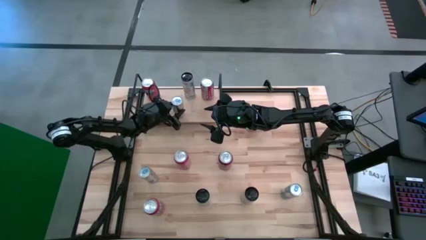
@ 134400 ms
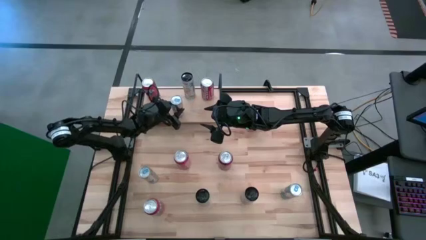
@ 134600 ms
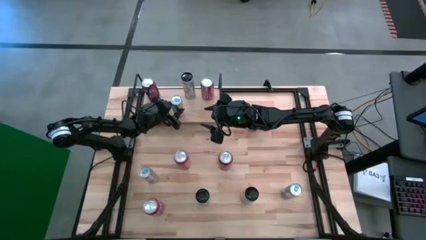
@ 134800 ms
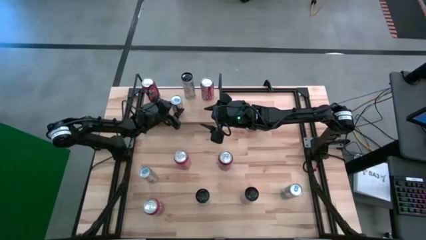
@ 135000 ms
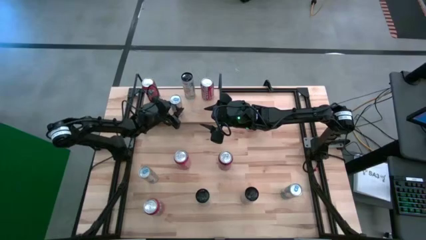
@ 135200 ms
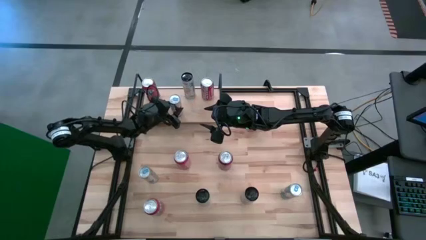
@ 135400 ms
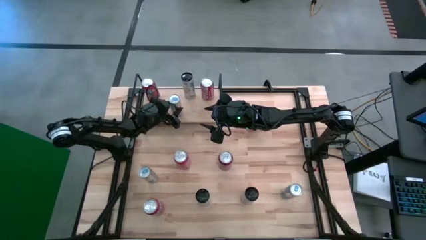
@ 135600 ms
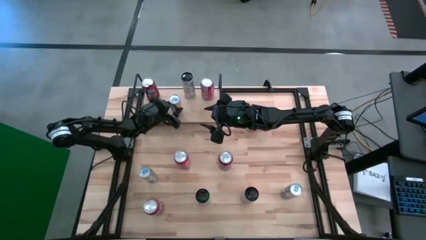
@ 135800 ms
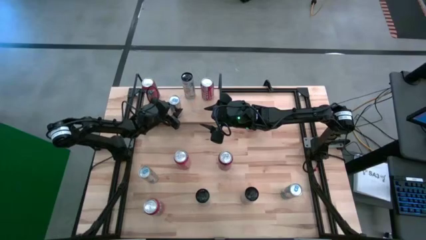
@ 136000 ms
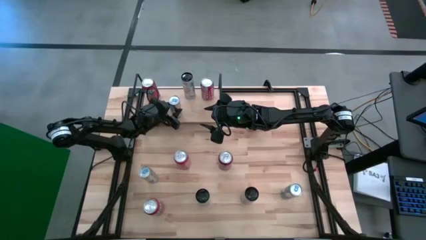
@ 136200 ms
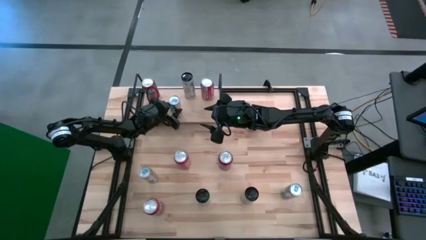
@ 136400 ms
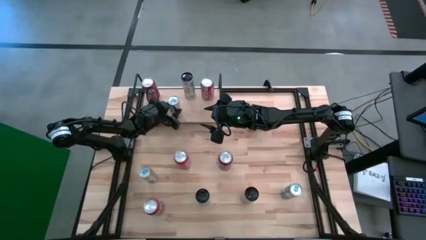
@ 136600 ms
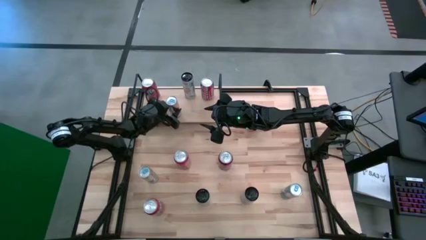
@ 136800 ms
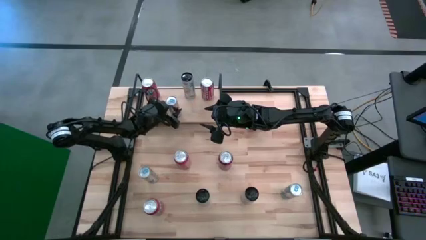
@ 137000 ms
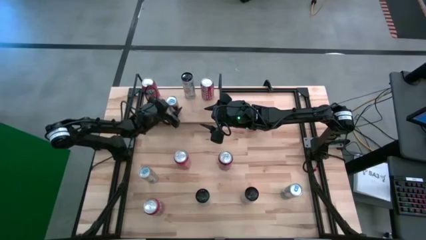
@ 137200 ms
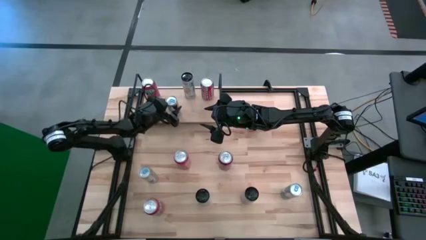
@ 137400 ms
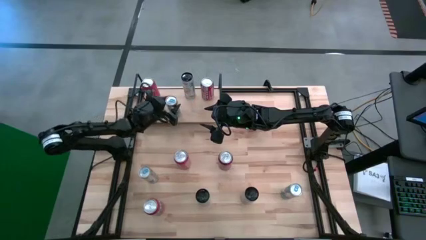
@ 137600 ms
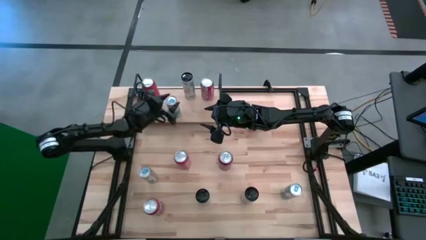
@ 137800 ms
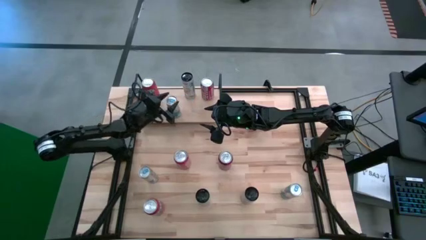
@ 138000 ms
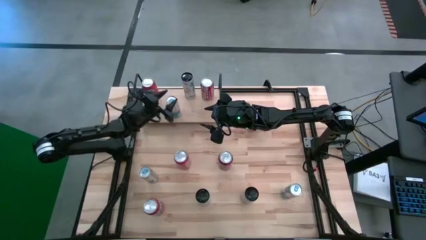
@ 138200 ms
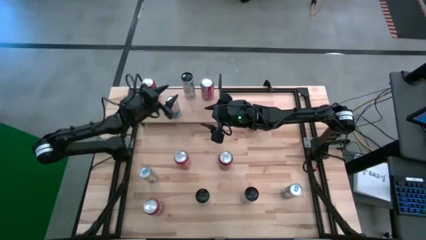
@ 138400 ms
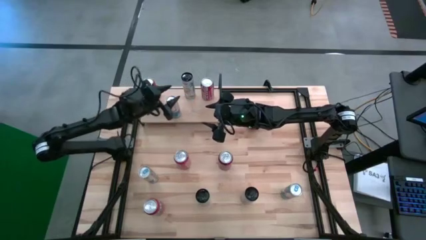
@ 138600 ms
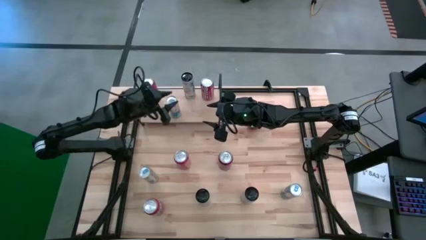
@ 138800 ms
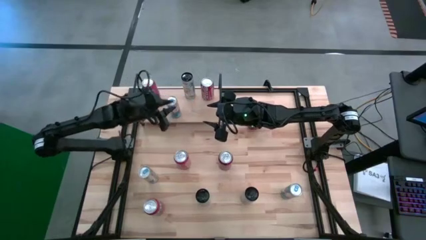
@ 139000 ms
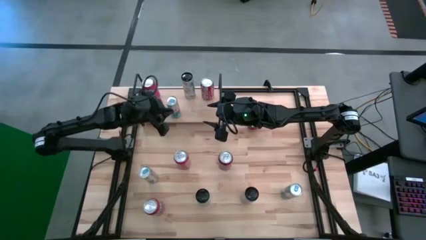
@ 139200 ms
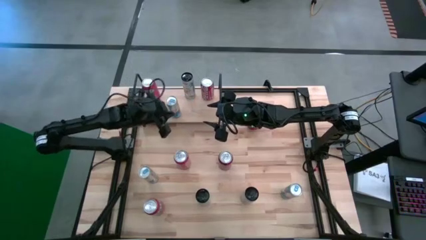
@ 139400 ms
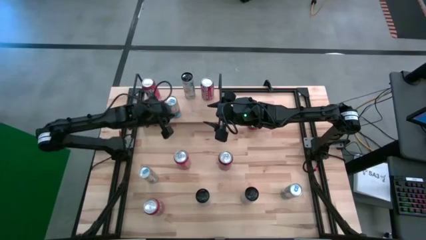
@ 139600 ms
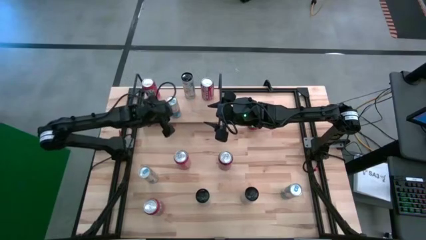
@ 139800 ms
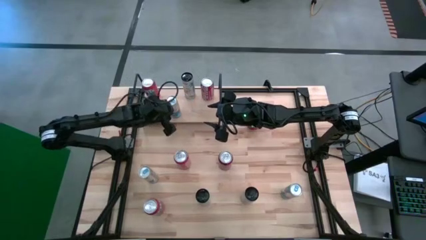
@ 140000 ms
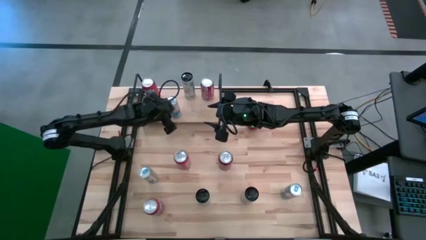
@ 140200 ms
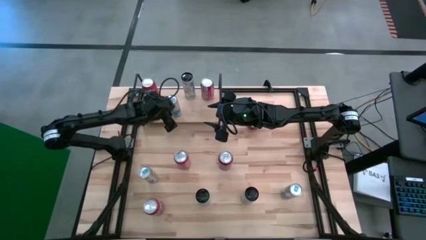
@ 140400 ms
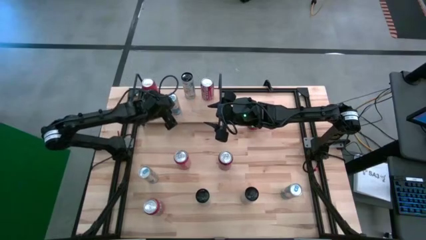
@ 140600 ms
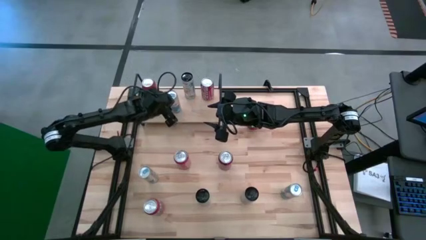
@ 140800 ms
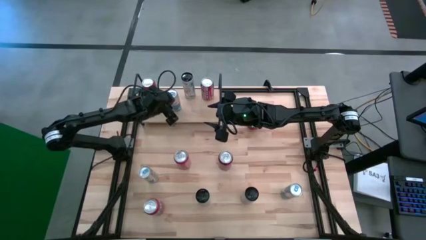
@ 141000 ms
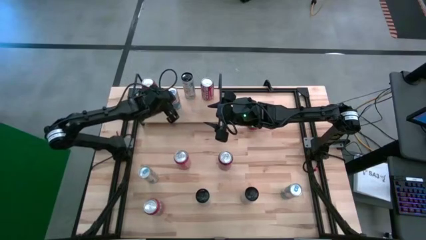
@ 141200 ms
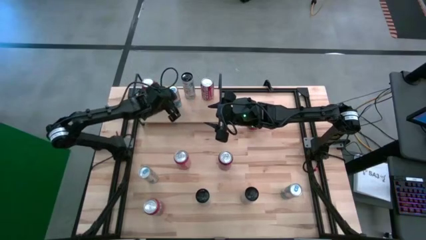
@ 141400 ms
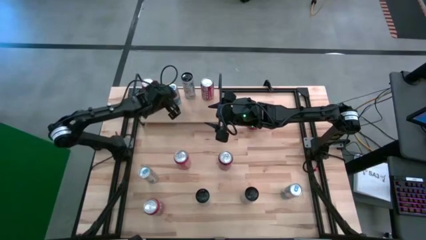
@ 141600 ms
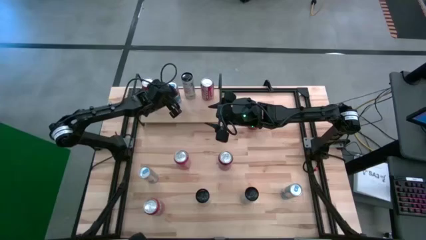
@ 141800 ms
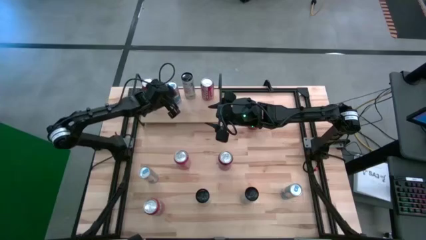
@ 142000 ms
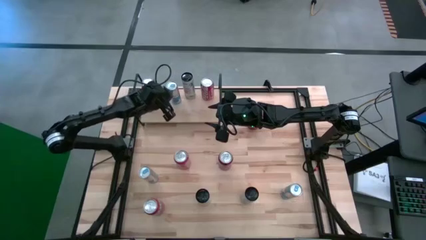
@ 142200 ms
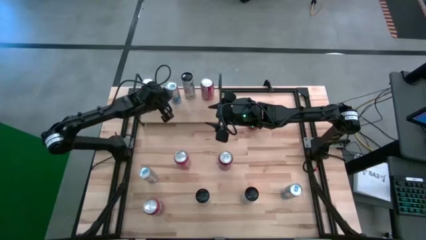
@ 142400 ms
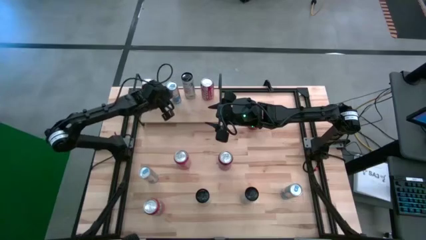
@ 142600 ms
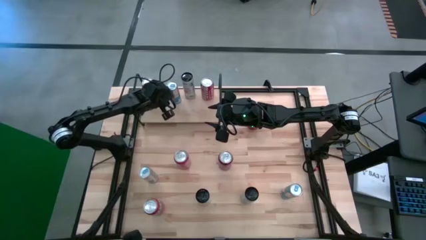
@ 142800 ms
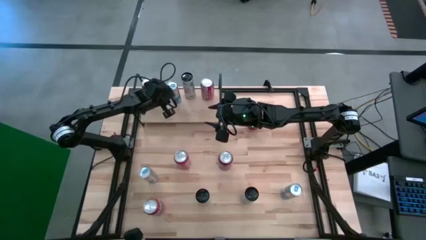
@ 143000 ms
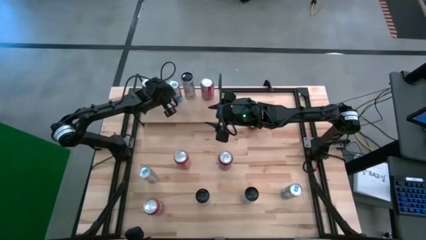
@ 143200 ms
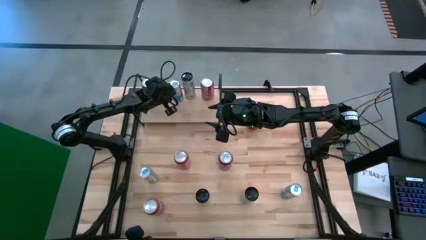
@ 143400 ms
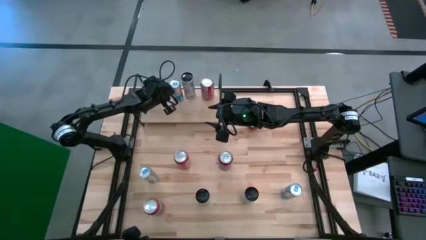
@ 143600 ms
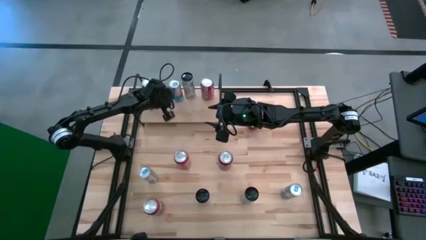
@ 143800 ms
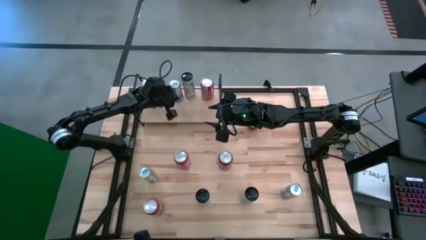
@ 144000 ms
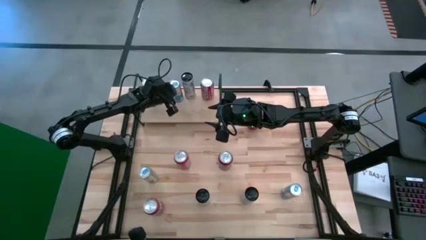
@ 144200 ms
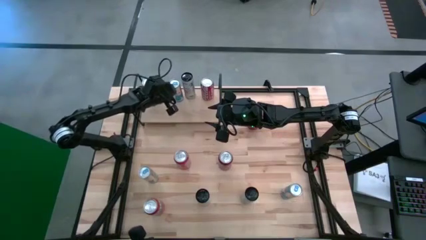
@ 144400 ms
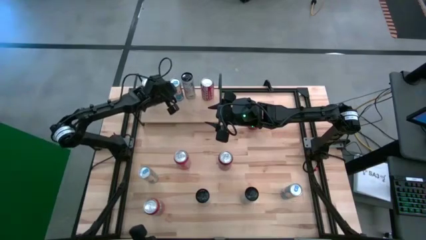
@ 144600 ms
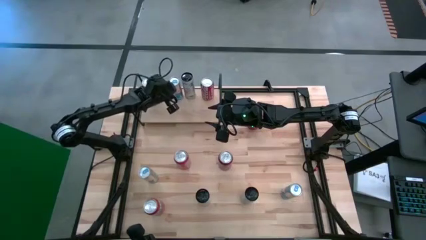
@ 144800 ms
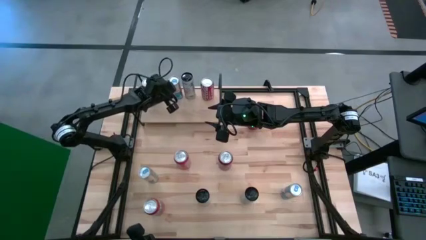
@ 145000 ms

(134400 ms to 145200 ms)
Task: Place canned beverage on shelf
Put the top blue soda can on the shelf
